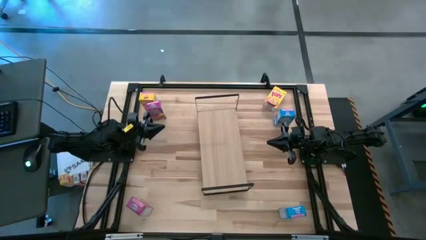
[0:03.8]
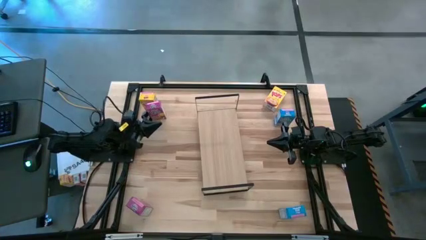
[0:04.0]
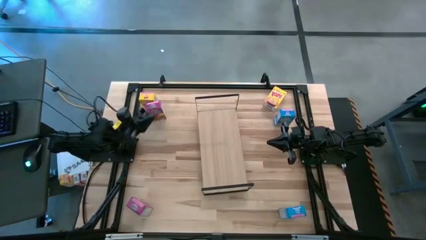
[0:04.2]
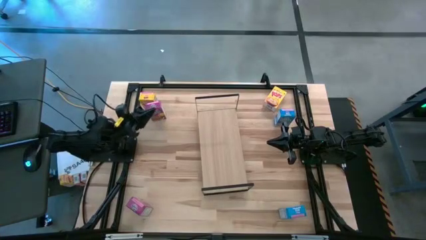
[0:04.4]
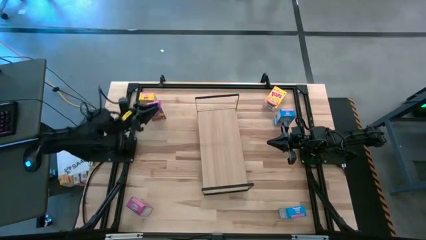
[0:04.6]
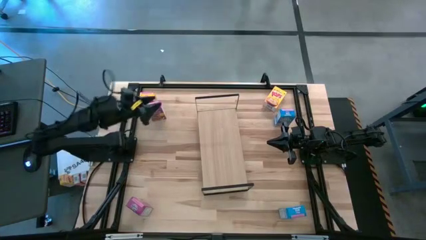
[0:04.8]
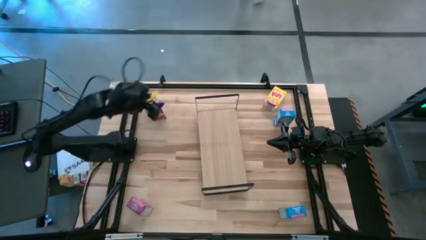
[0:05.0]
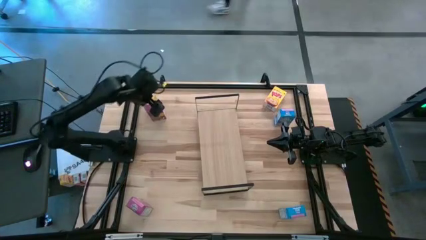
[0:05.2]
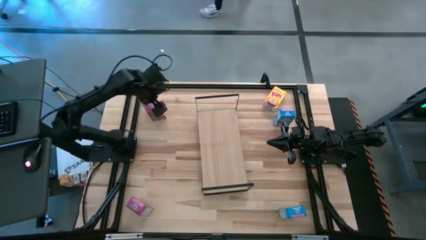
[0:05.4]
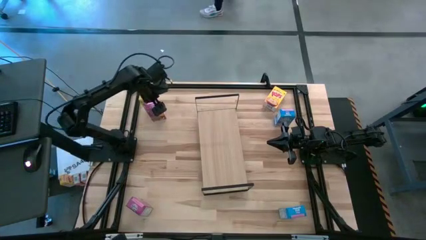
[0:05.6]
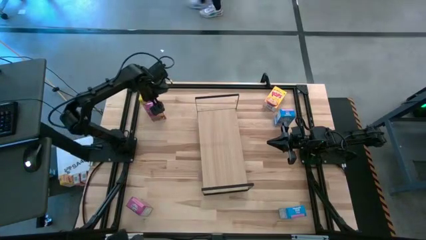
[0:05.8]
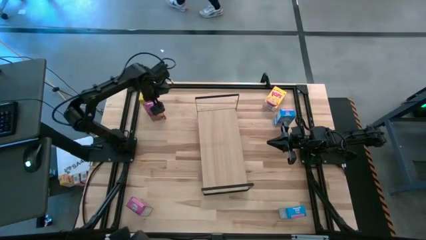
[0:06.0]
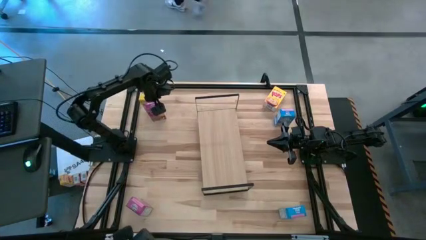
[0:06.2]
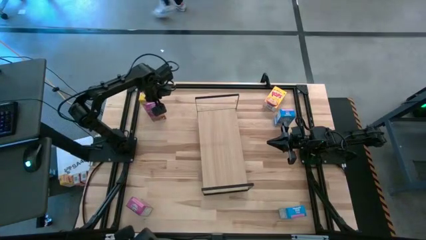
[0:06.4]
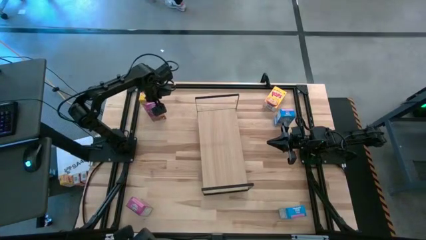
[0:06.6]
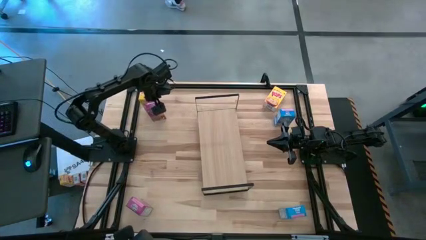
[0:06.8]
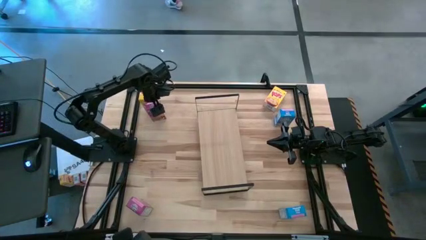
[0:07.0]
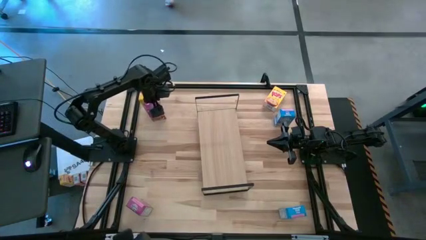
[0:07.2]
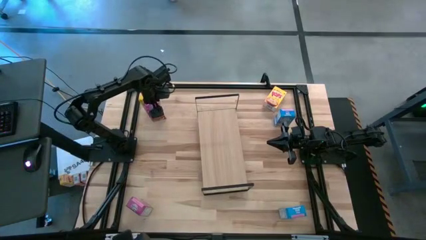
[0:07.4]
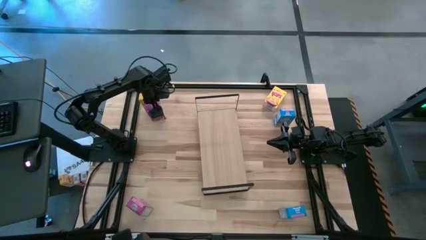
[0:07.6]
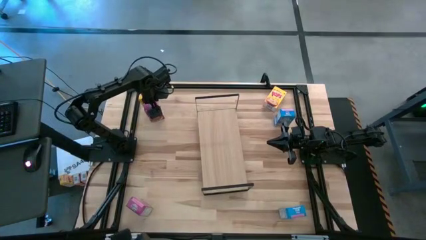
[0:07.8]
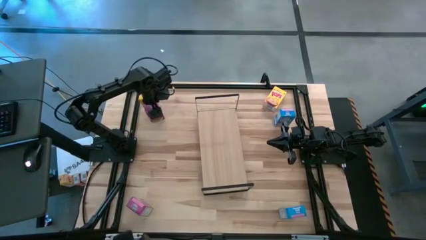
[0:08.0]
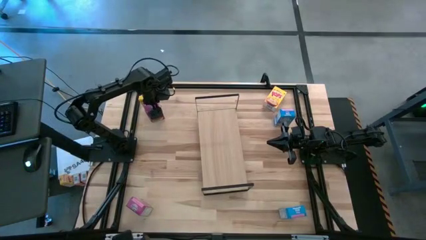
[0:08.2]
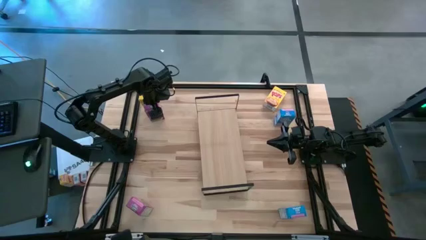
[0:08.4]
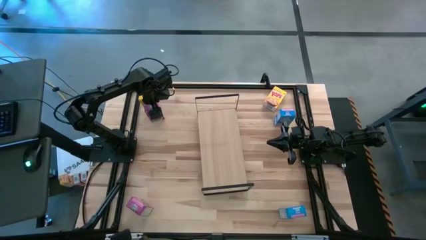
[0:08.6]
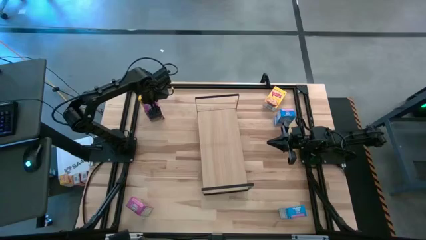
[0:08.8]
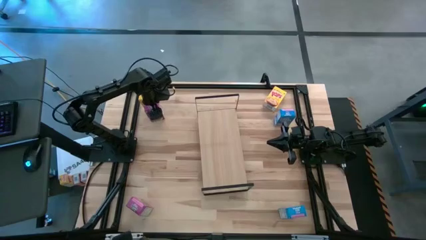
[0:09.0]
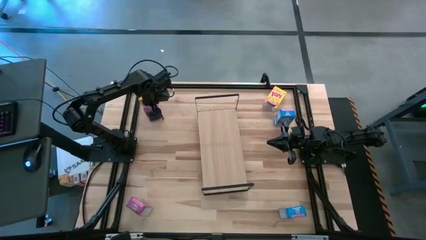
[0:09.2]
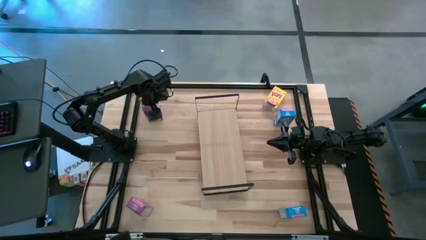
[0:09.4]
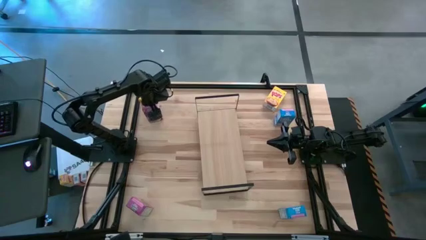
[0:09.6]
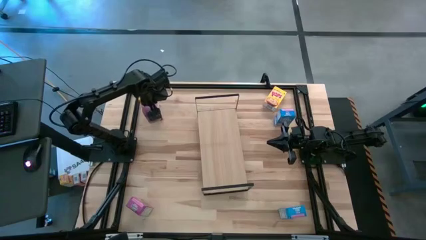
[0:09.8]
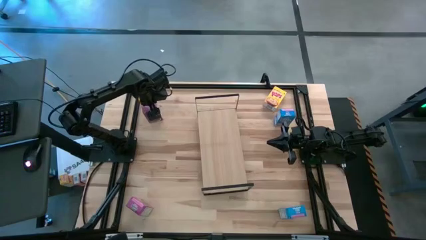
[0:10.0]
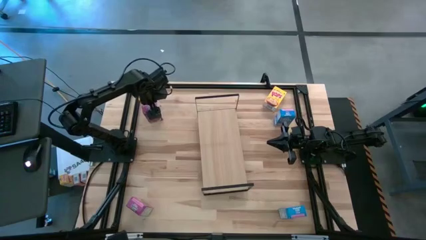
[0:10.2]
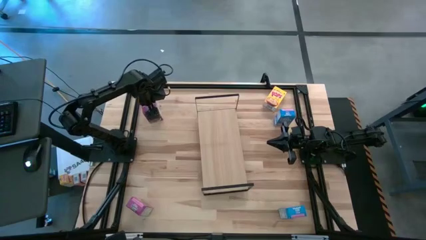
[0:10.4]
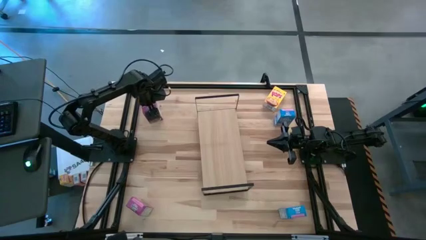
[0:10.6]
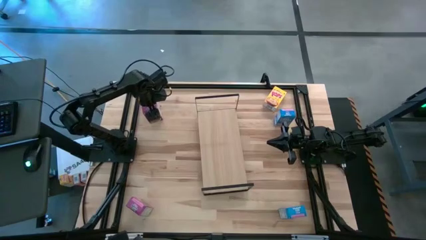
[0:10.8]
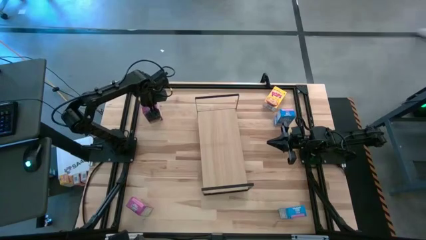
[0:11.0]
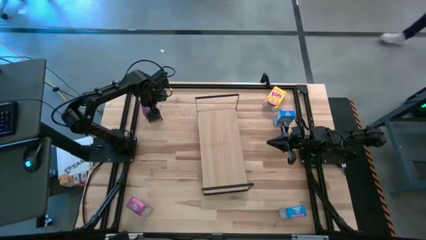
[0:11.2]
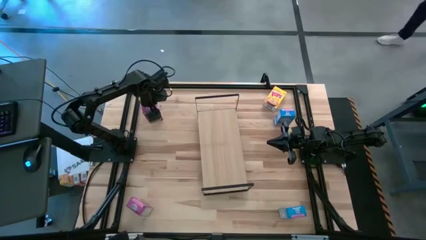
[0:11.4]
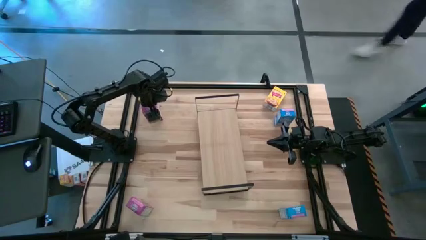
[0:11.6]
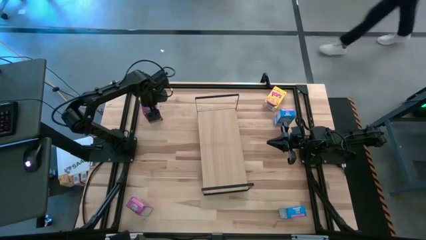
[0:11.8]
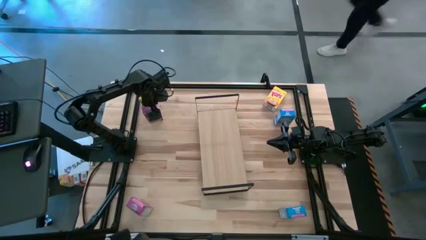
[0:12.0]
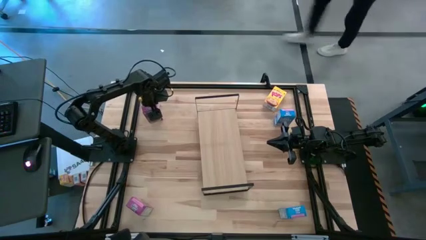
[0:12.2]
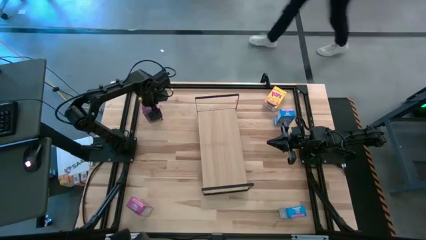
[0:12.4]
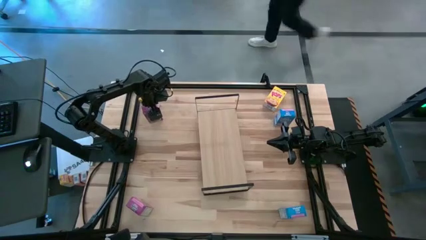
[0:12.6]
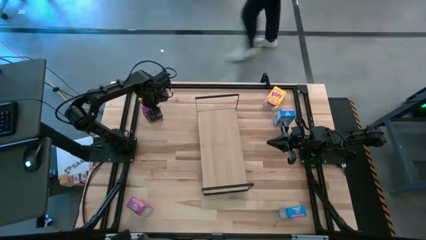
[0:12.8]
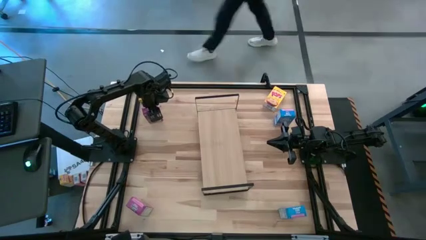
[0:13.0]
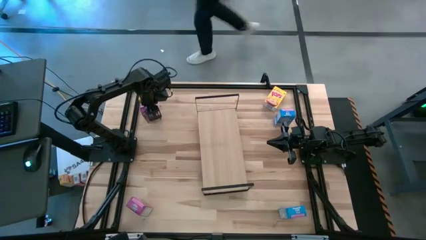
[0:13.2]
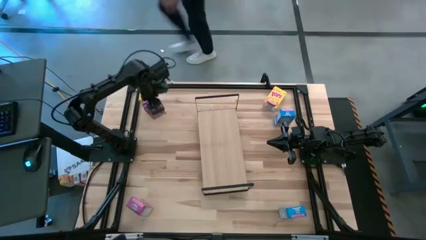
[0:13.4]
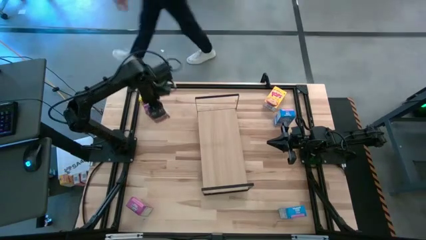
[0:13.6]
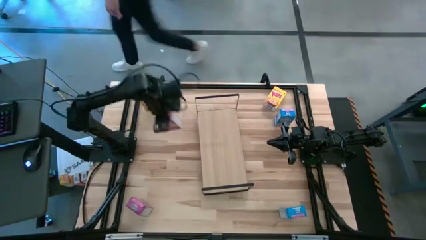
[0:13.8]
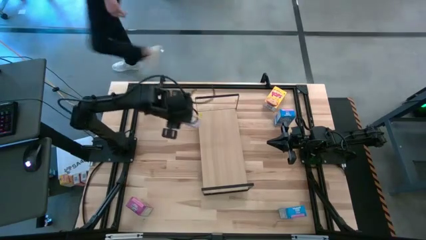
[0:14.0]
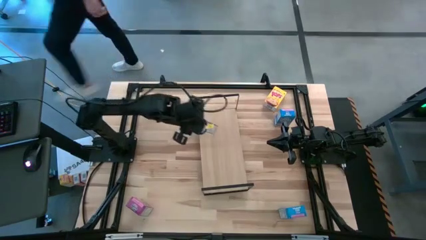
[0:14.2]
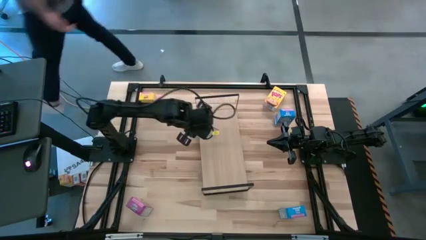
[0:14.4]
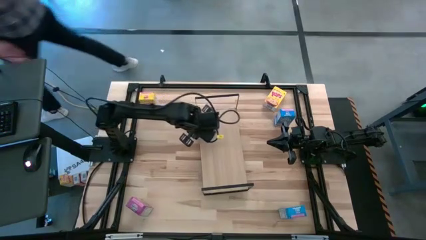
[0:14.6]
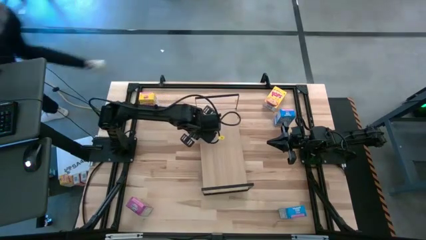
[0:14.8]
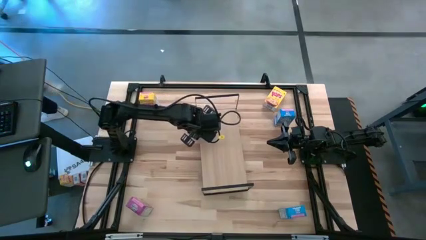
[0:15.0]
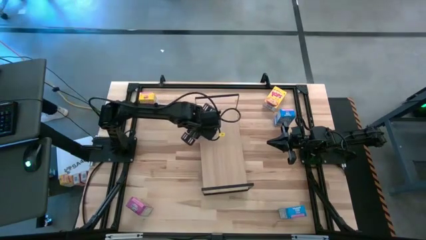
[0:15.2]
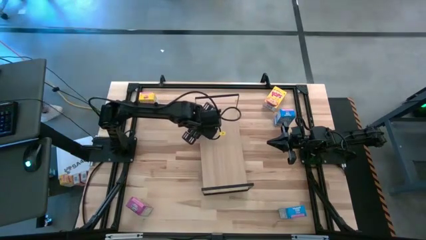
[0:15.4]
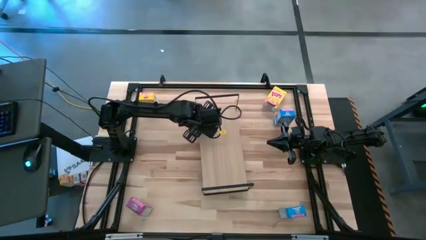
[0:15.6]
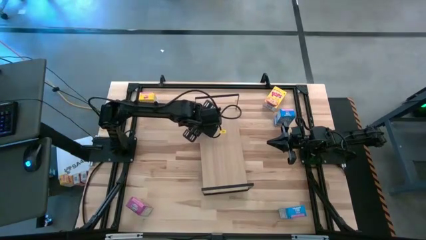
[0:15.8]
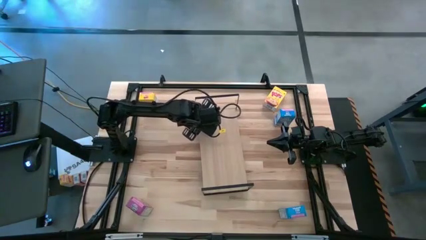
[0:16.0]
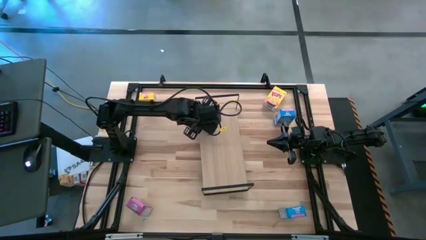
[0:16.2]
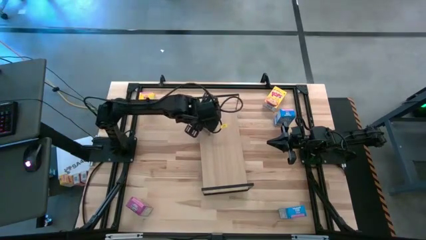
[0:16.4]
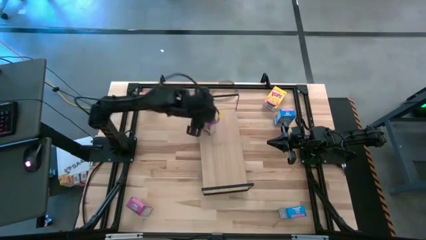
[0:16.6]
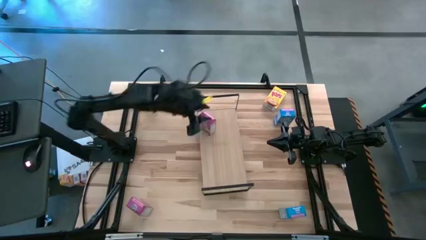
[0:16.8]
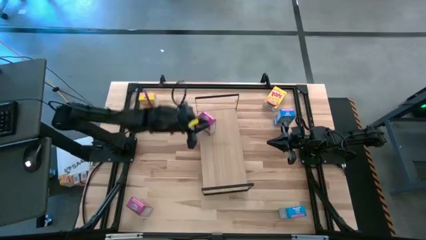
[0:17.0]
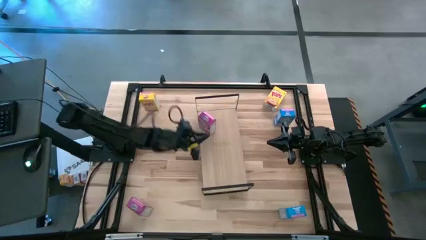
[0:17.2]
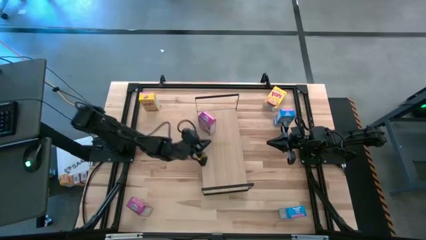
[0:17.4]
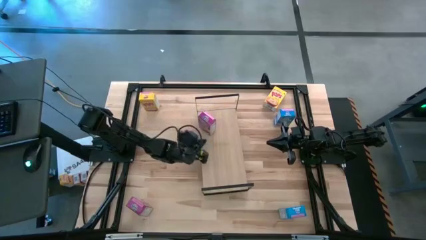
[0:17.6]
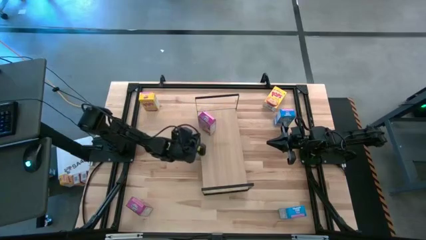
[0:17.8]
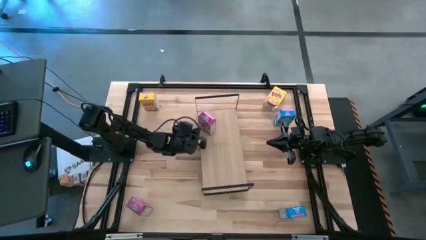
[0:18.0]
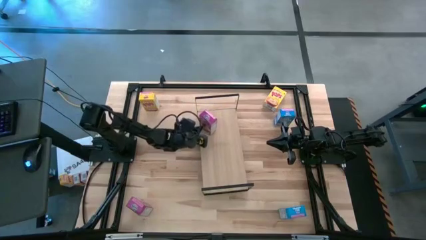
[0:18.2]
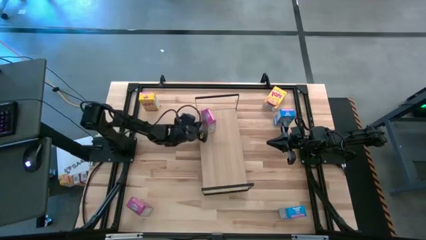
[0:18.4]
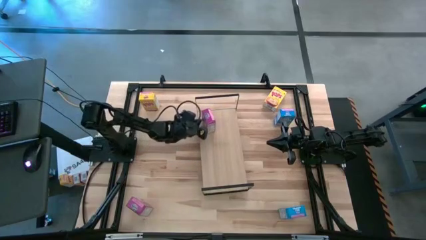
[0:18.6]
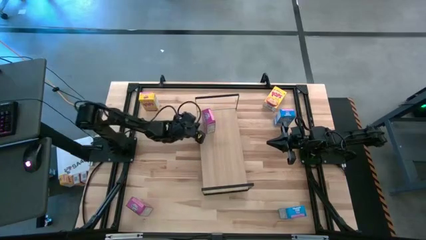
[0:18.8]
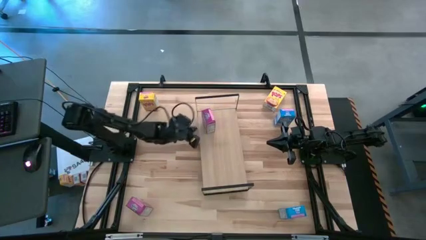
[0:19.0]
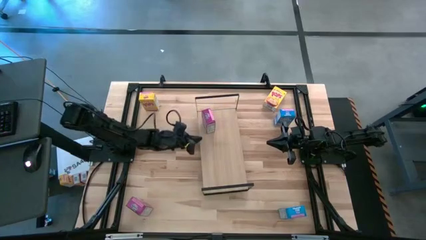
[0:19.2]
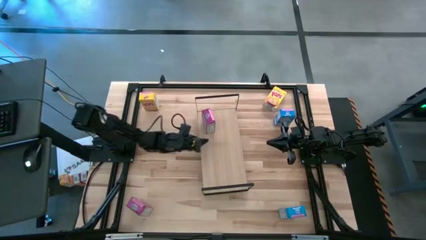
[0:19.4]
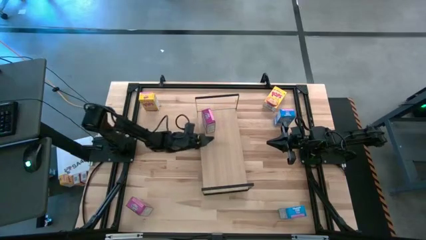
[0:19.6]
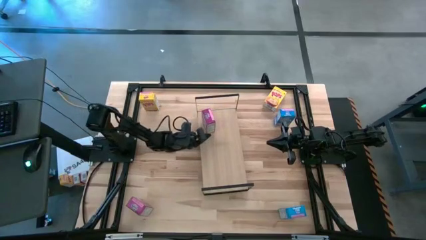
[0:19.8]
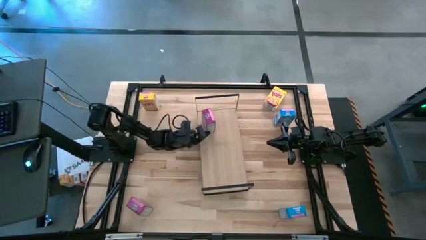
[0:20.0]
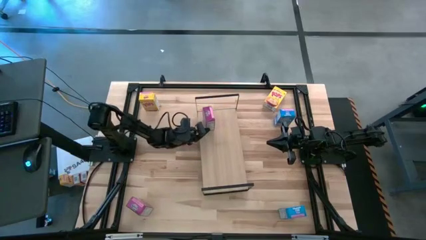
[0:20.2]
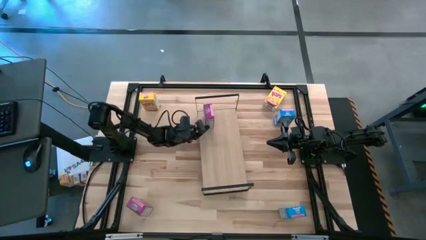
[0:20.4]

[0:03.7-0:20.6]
Task: Stack cereal on shelf
Put the top purple cereal box on the shelf
